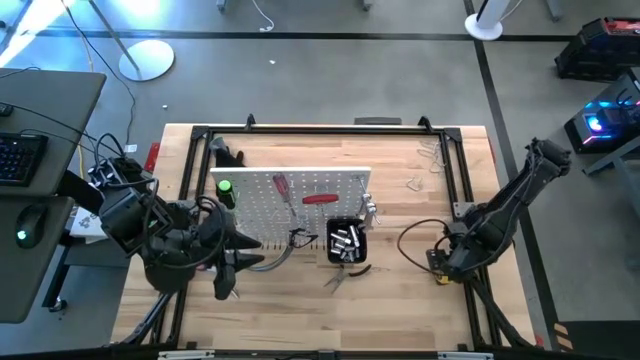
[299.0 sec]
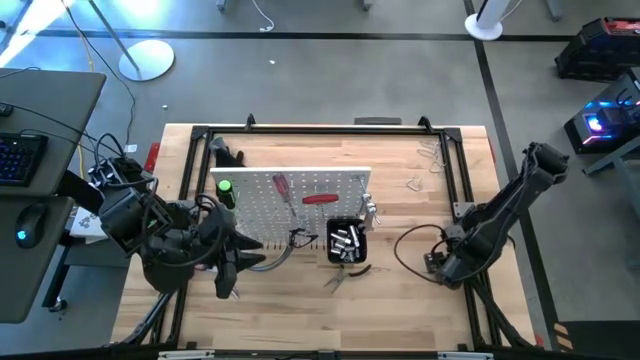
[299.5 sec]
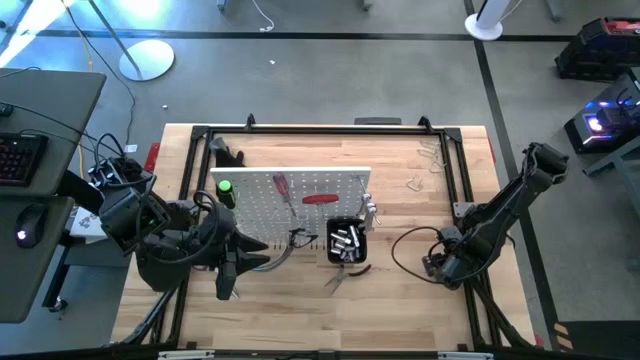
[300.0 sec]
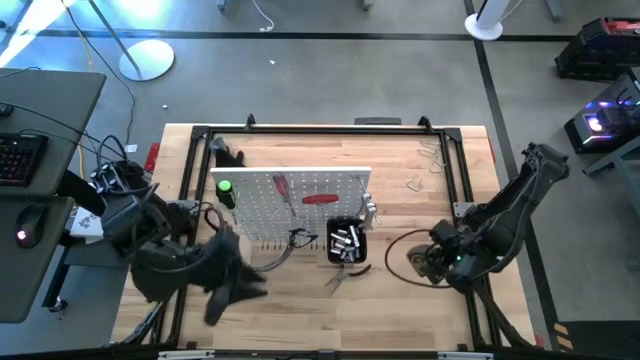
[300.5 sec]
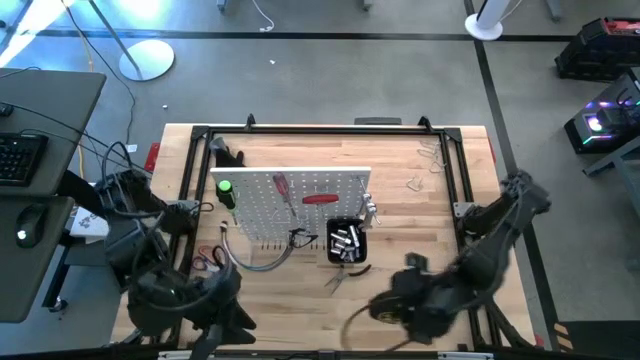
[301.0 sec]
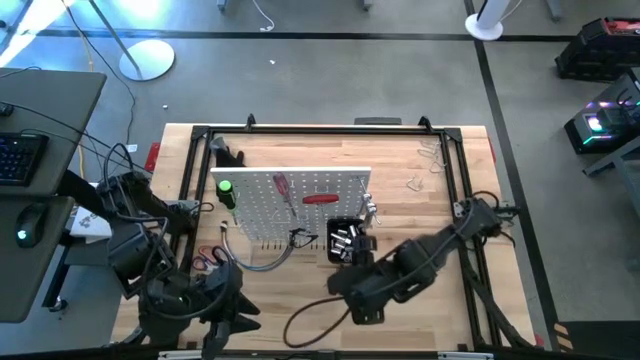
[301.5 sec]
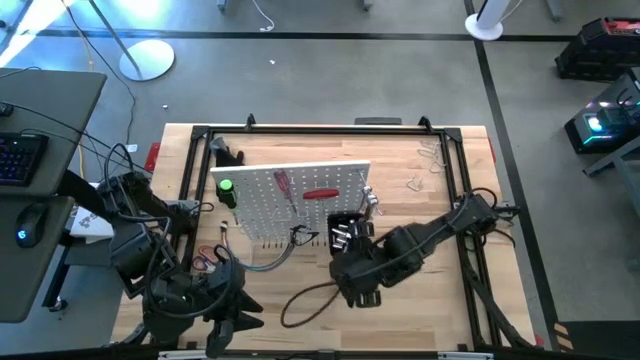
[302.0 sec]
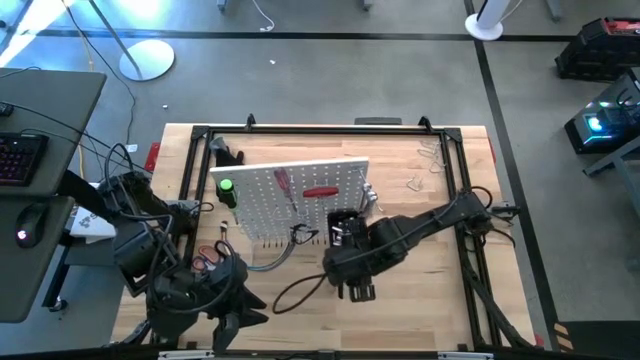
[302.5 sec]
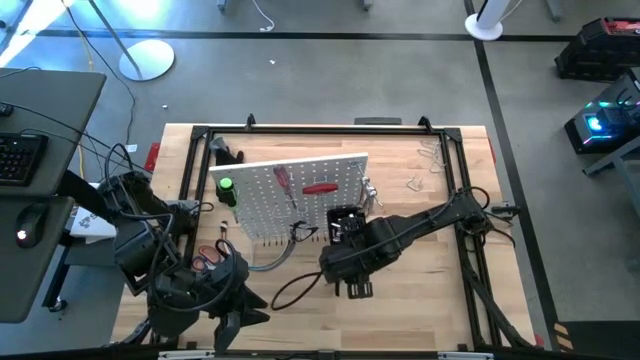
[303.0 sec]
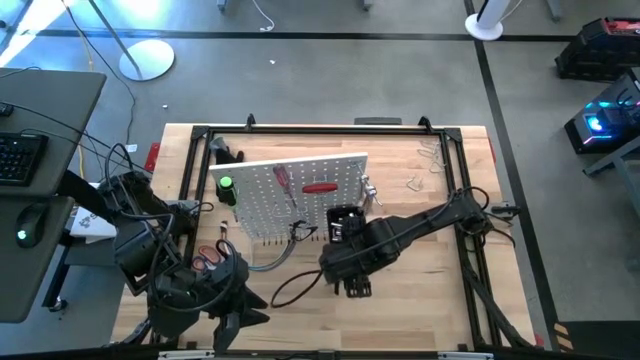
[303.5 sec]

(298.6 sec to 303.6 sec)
Task: Hang tools onto peg board
Hang the measuring tape on peg board

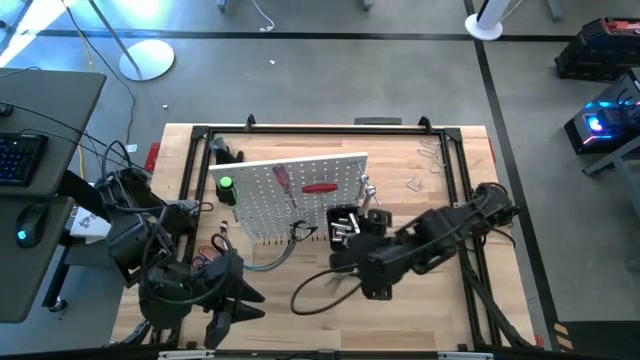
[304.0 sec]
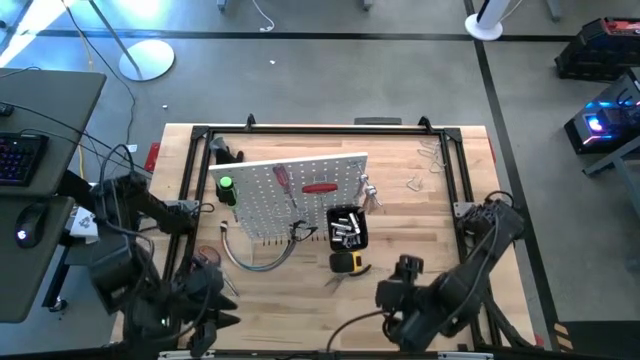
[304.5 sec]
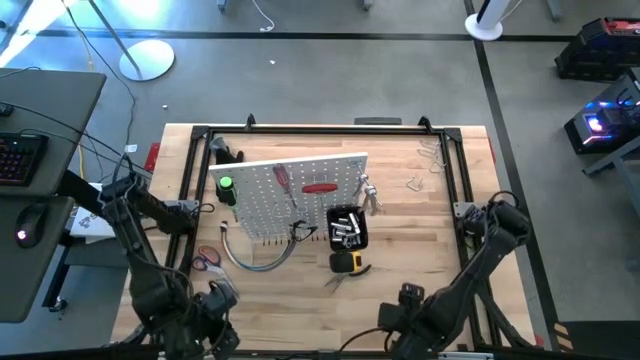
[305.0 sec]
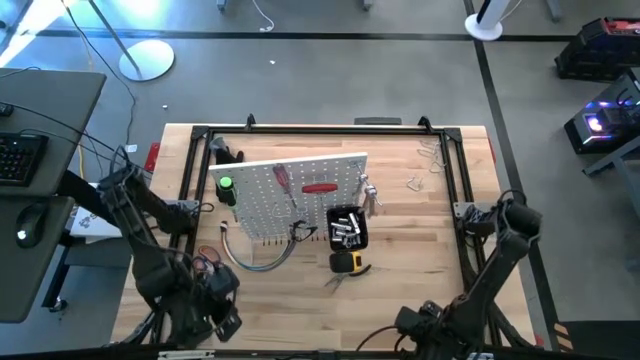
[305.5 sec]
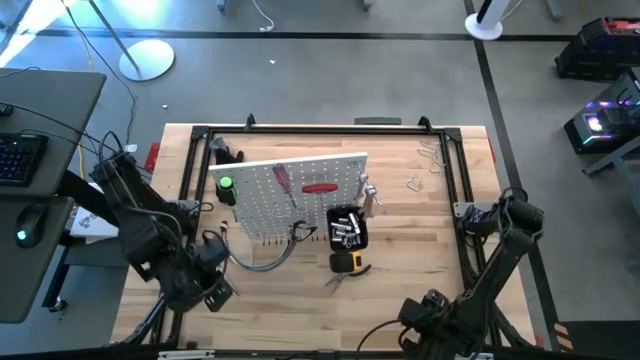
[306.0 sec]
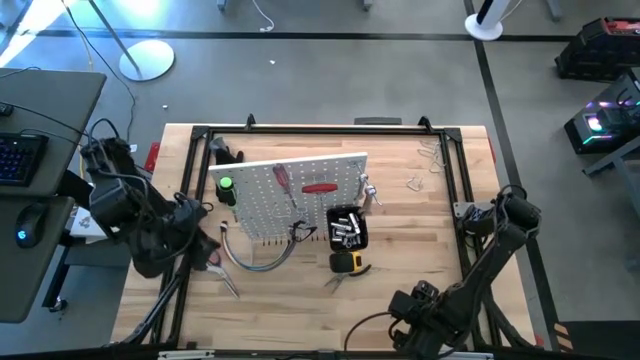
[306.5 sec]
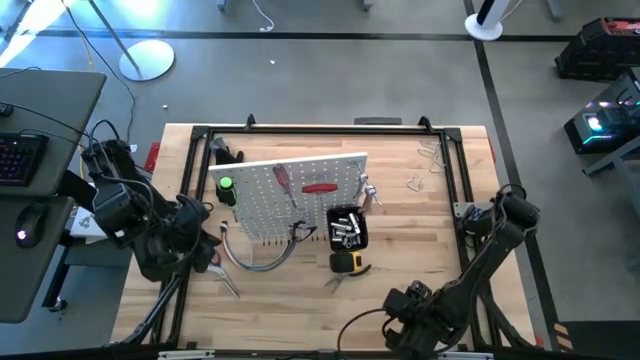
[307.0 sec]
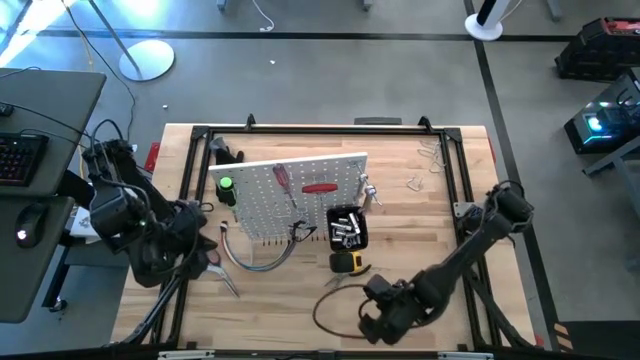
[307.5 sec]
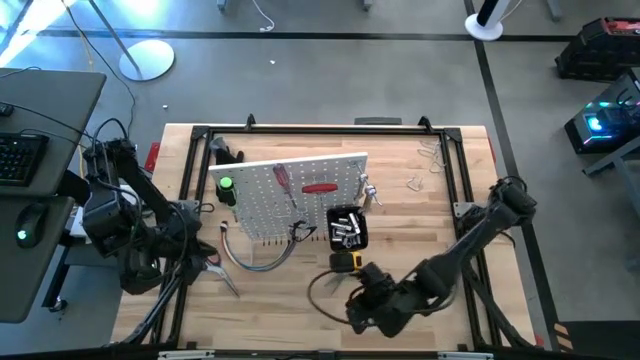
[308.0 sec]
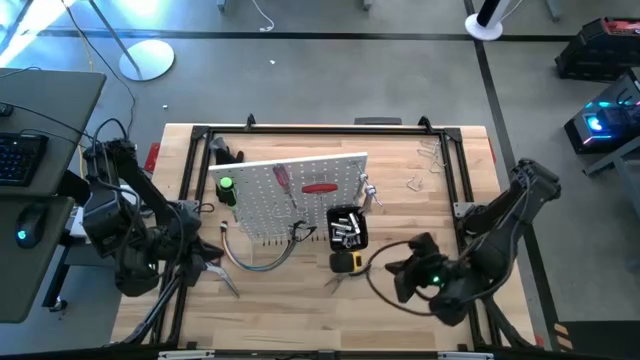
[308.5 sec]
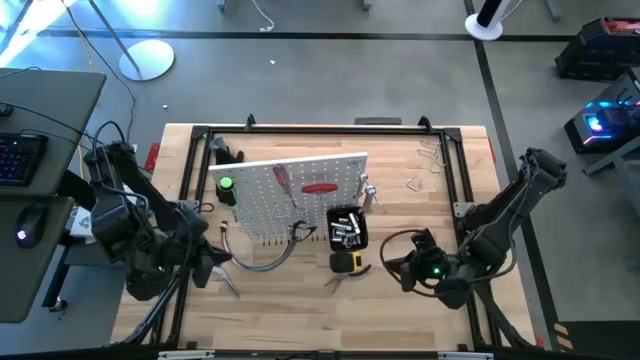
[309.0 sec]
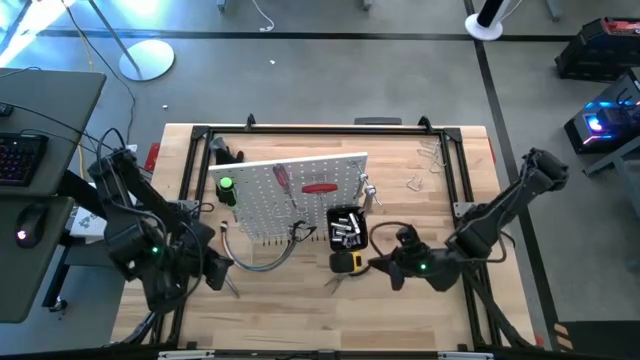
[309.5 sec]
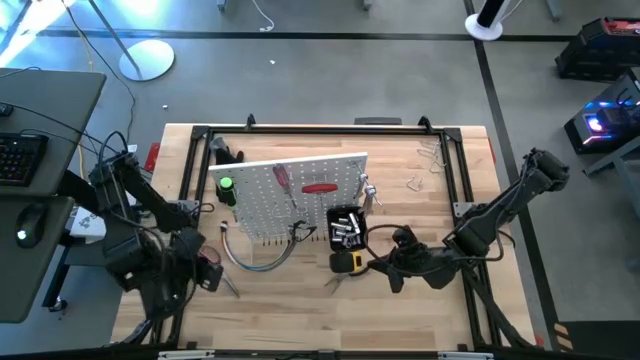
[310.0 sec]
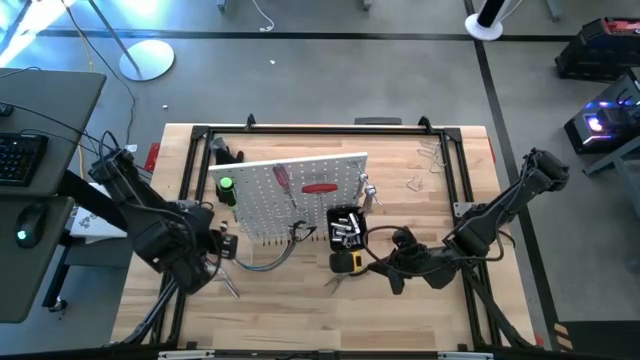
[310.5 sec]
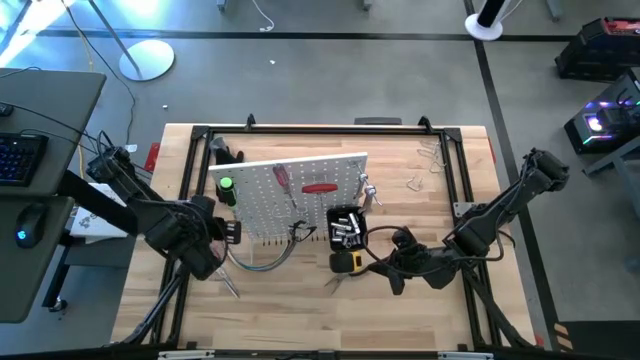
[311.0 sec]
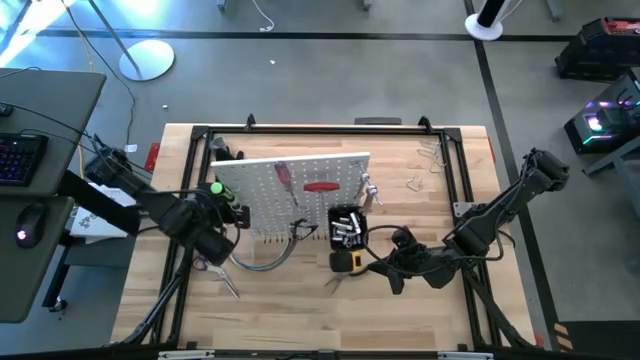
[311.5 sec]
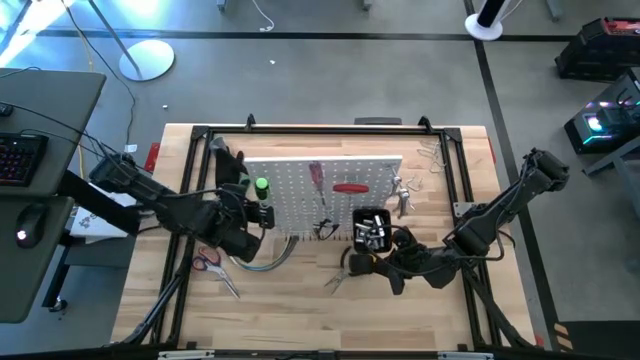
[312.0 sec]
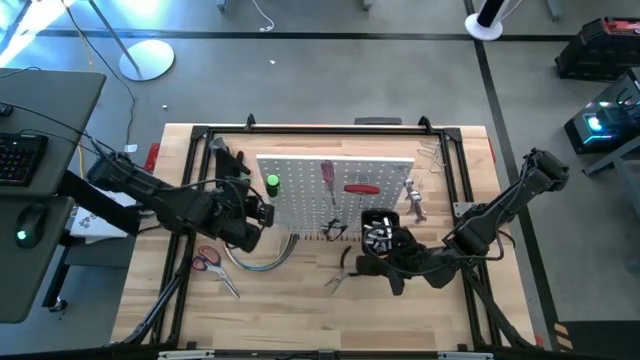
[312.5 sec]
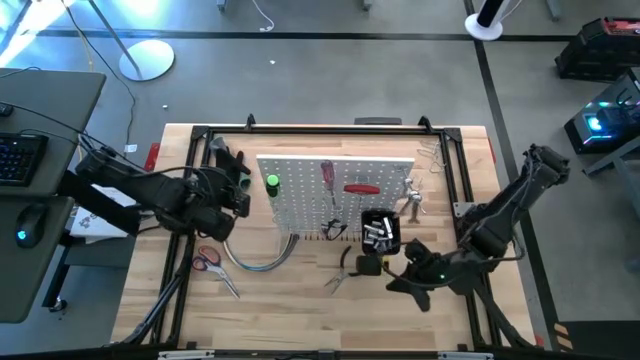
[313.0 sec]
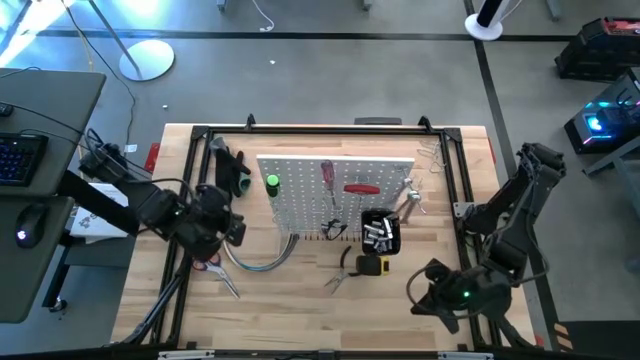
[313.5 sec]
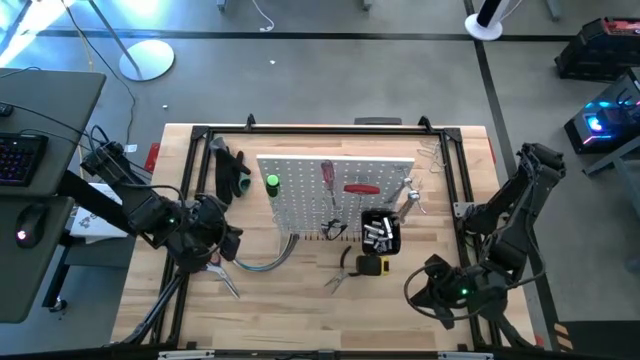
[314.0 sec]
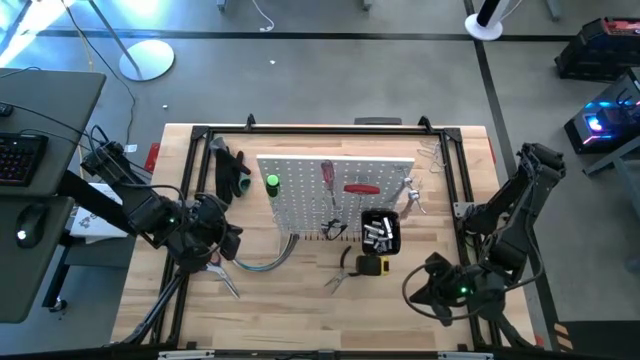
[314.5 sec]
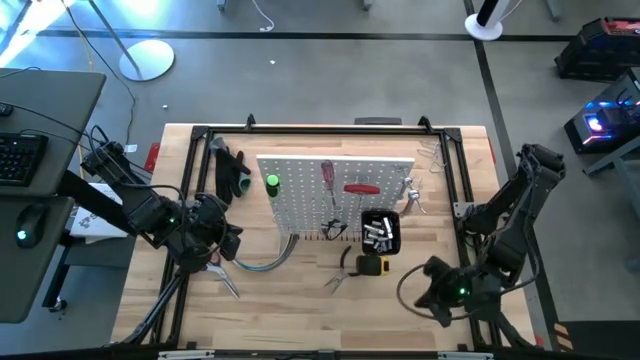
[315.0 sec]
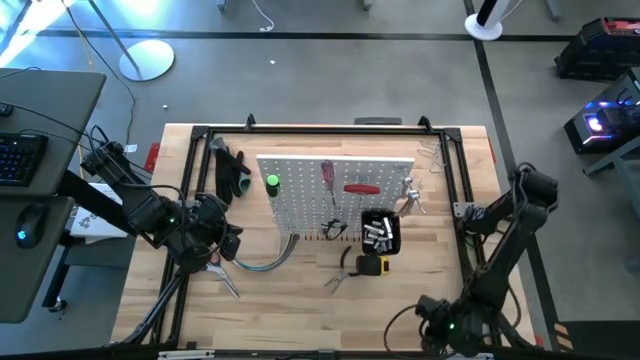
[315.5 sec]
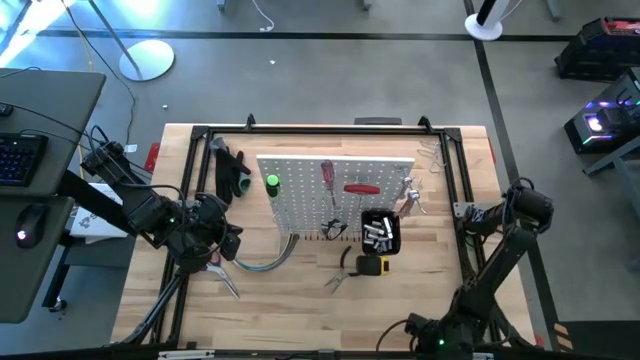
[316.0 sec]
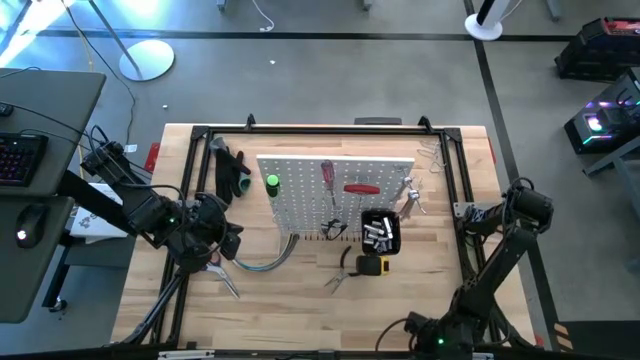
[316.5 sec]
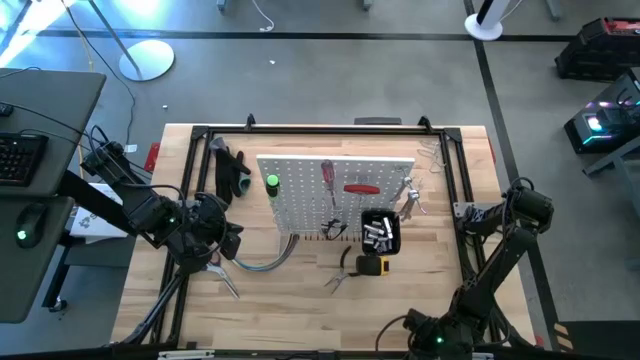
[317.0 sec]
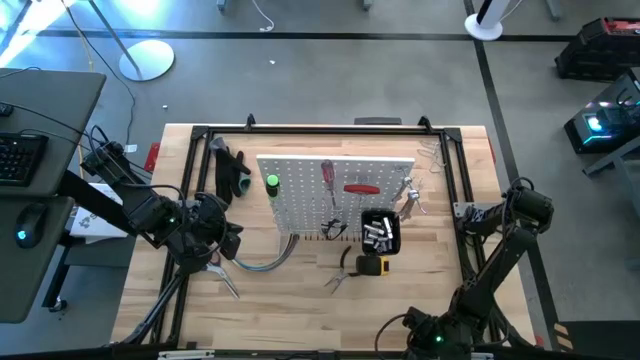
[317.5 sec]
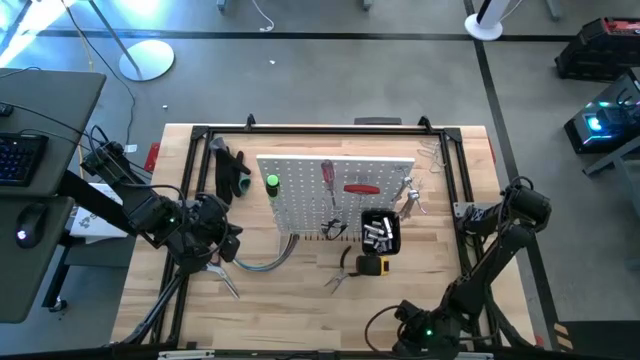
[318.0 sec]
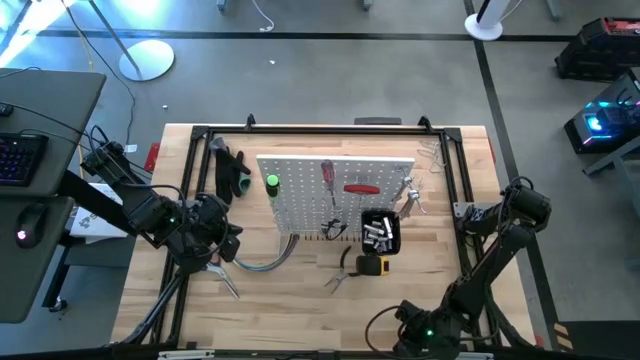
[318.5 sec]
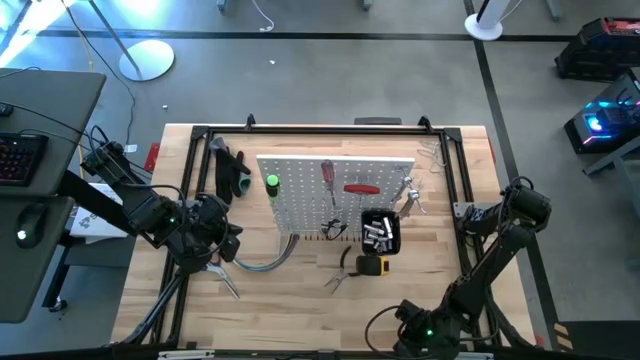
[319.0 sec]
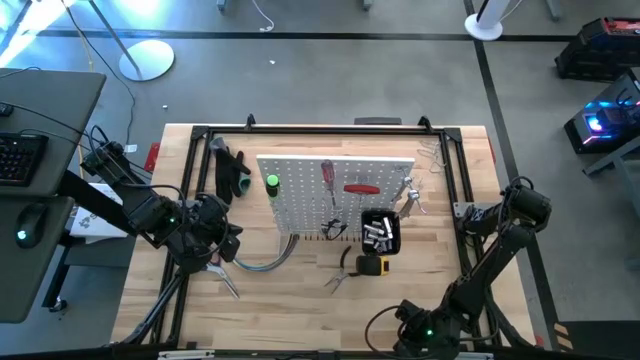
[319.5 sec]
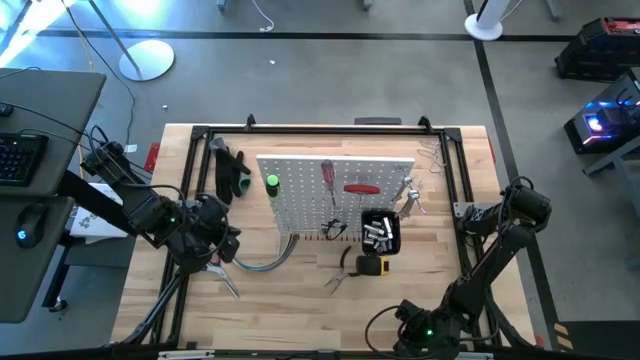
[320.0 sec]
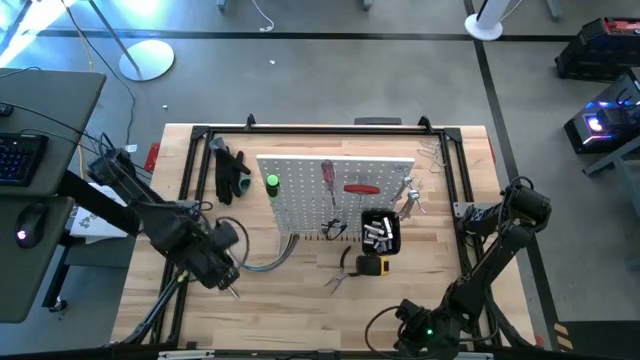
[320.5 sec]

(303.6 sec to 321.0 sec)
Hang the plier on the peg board
